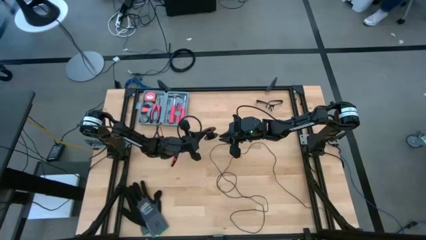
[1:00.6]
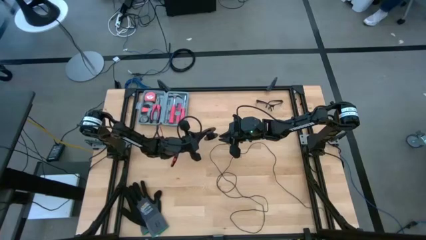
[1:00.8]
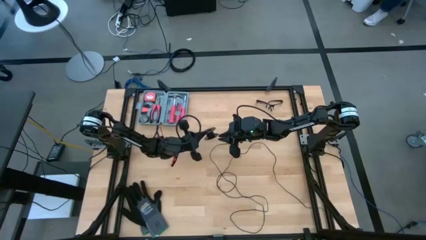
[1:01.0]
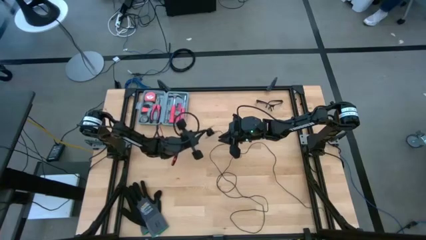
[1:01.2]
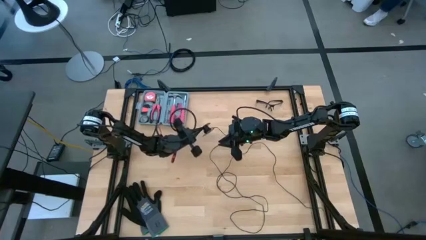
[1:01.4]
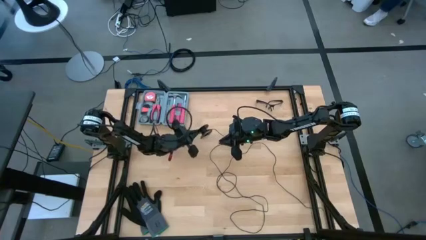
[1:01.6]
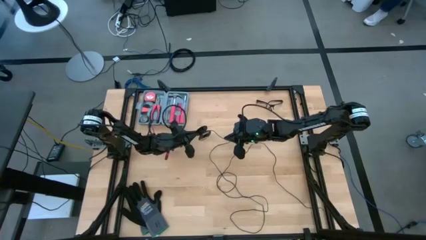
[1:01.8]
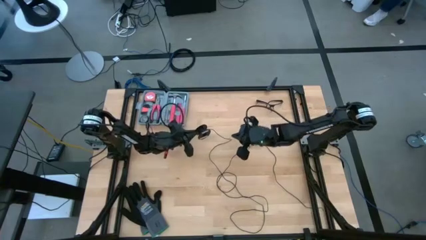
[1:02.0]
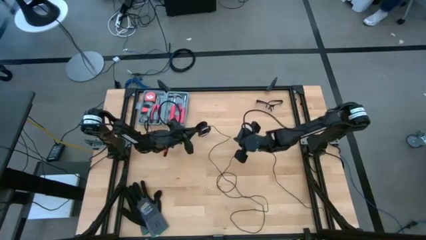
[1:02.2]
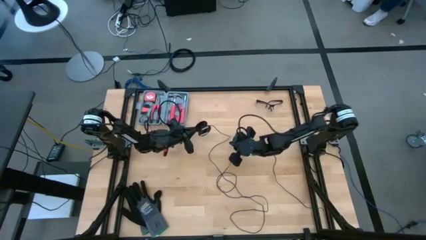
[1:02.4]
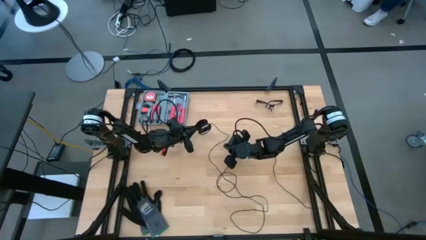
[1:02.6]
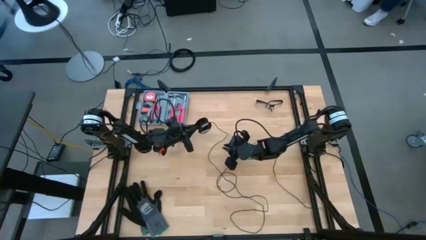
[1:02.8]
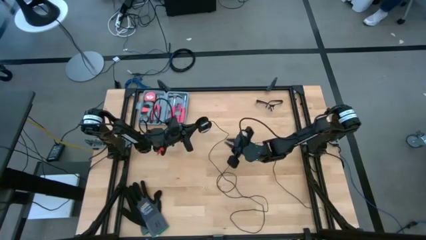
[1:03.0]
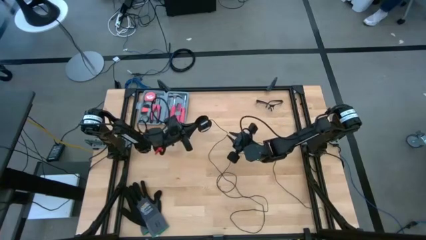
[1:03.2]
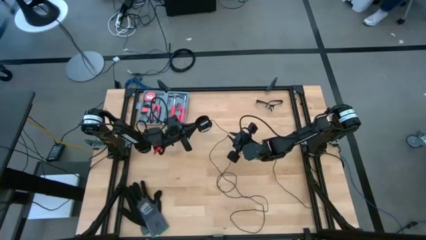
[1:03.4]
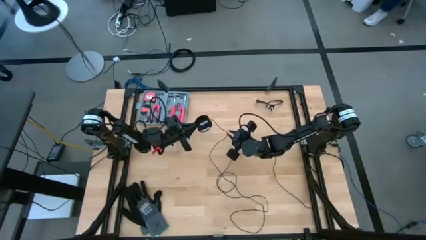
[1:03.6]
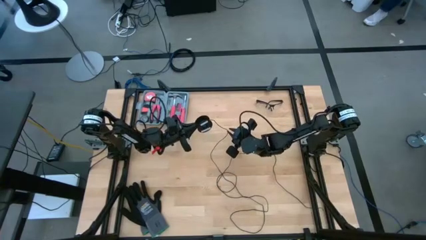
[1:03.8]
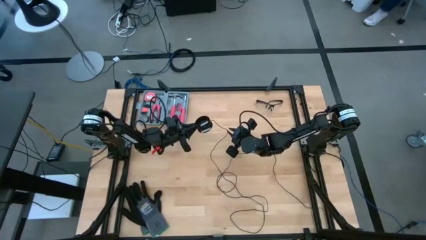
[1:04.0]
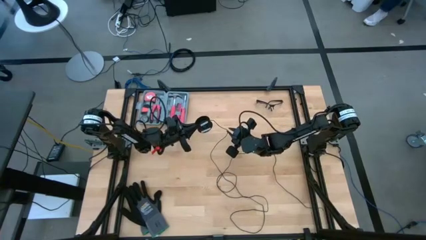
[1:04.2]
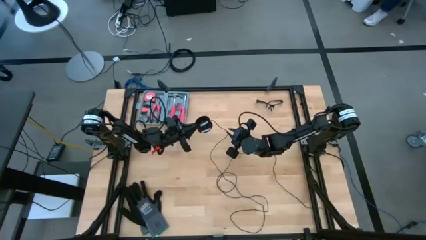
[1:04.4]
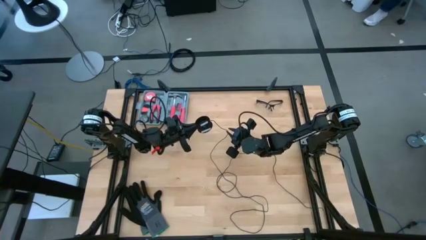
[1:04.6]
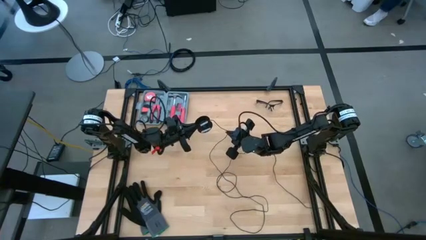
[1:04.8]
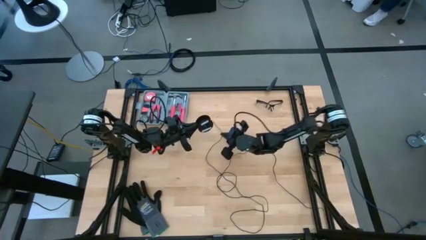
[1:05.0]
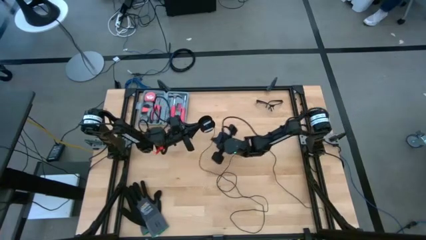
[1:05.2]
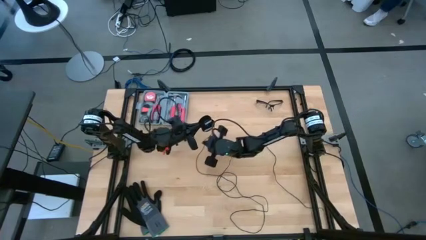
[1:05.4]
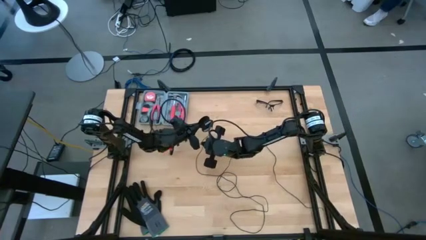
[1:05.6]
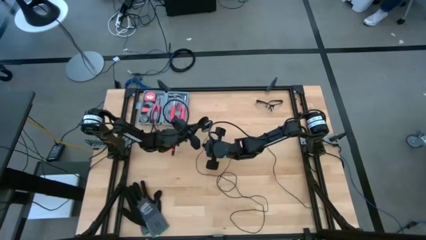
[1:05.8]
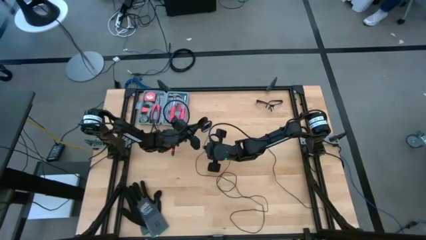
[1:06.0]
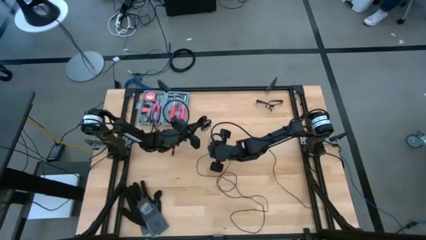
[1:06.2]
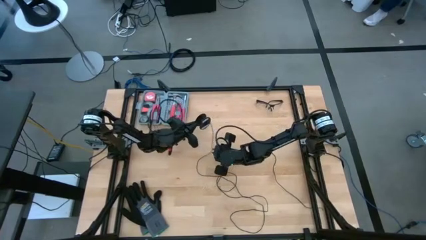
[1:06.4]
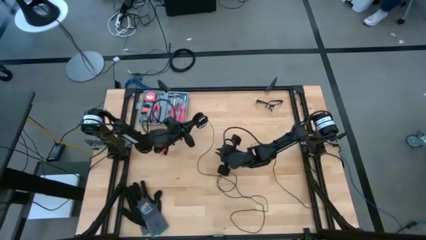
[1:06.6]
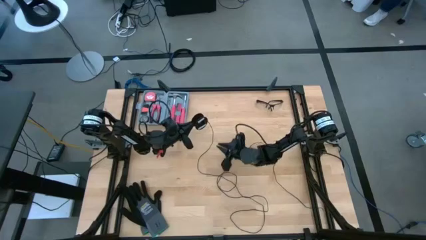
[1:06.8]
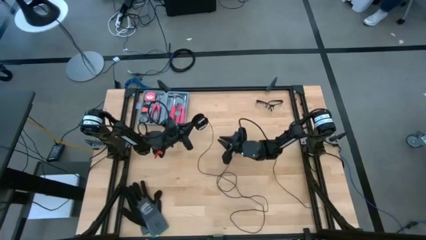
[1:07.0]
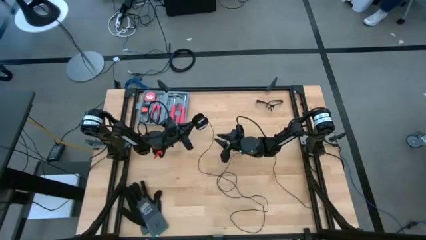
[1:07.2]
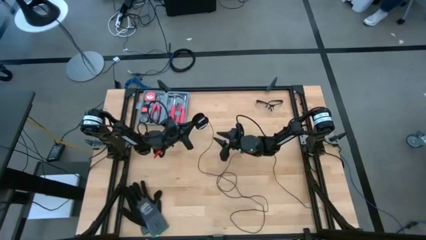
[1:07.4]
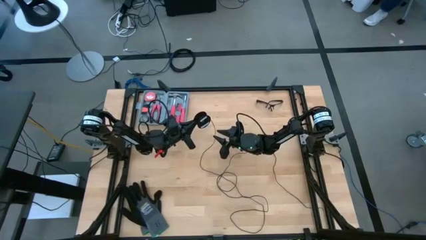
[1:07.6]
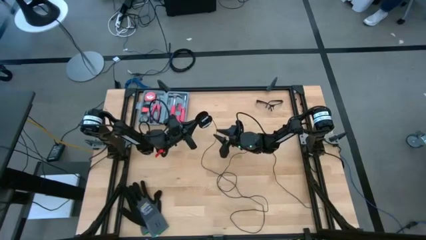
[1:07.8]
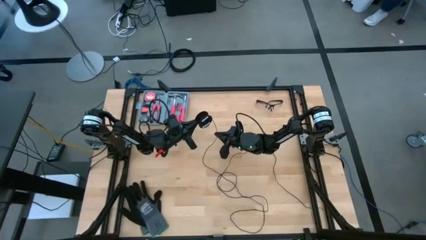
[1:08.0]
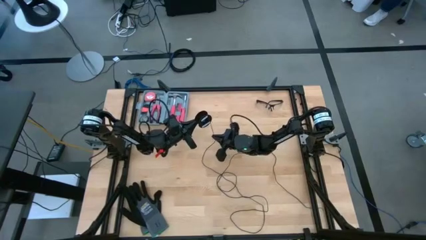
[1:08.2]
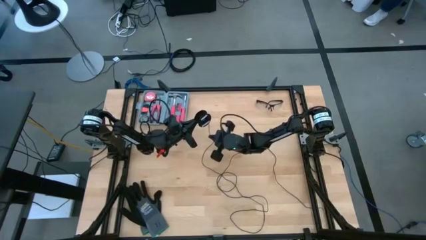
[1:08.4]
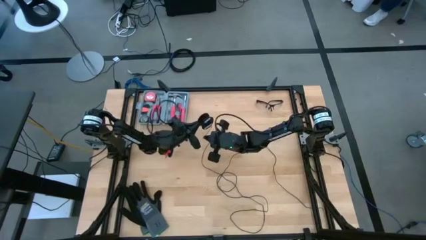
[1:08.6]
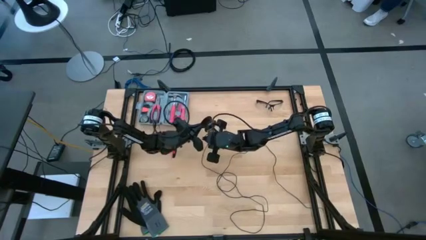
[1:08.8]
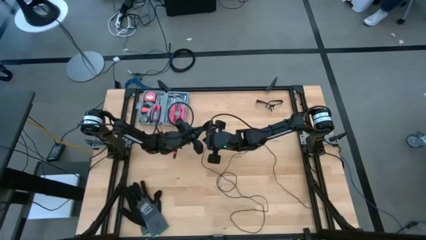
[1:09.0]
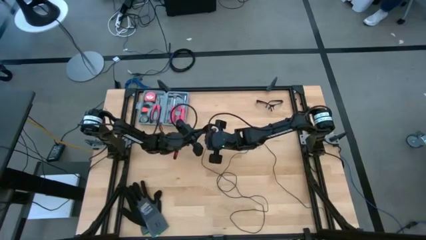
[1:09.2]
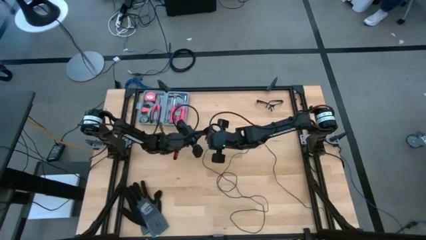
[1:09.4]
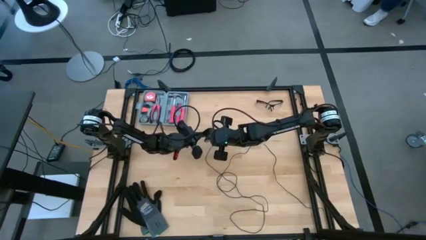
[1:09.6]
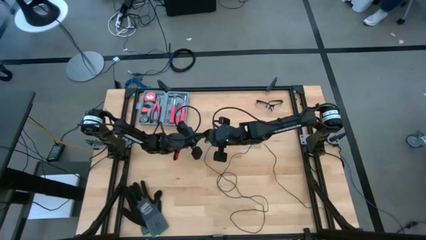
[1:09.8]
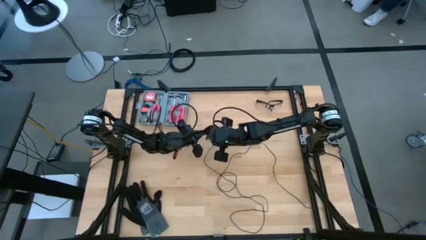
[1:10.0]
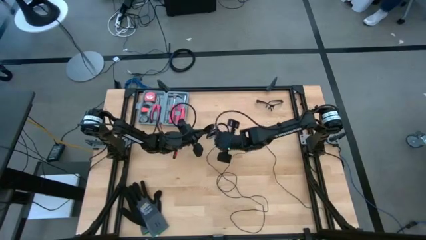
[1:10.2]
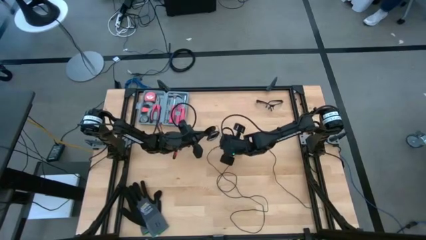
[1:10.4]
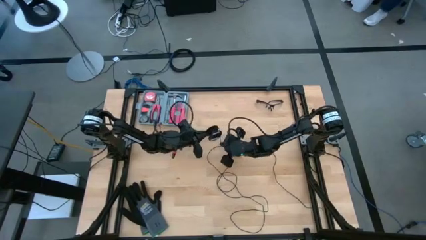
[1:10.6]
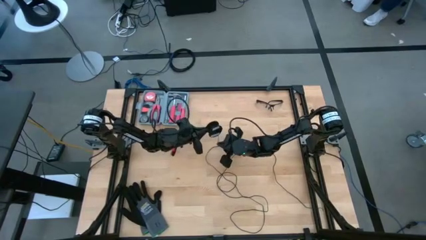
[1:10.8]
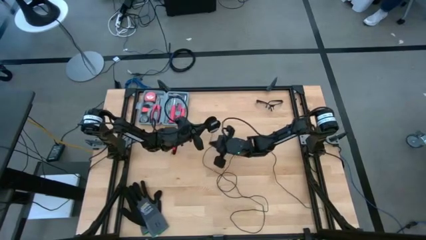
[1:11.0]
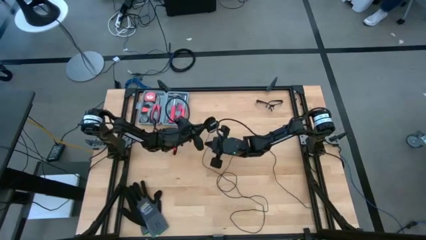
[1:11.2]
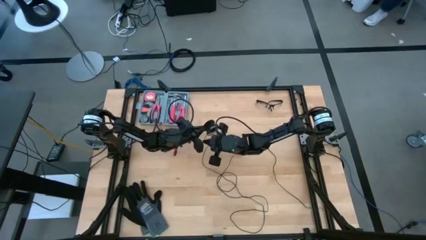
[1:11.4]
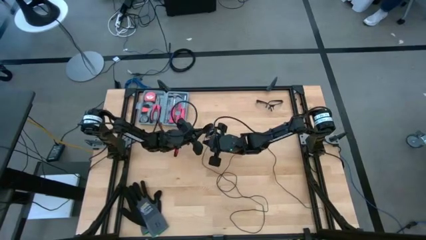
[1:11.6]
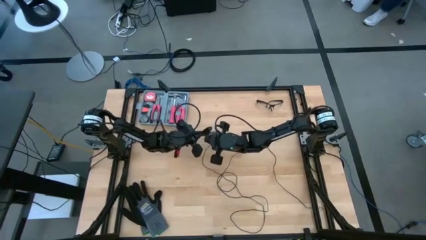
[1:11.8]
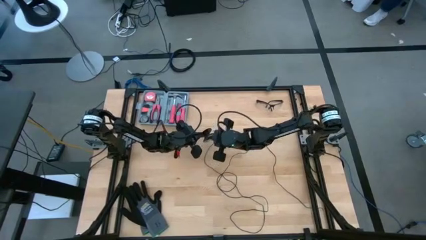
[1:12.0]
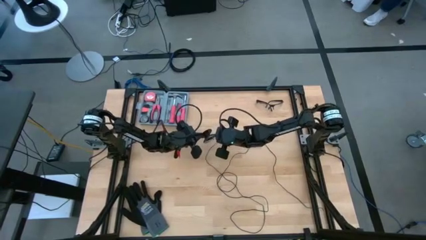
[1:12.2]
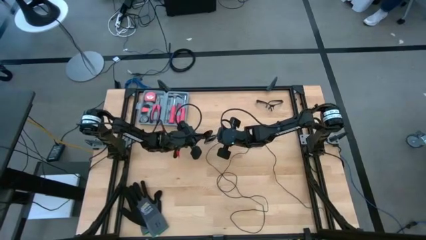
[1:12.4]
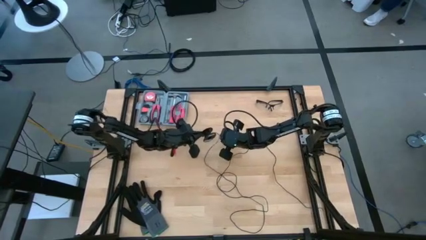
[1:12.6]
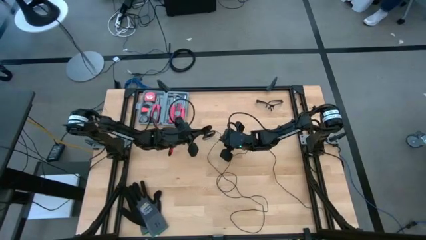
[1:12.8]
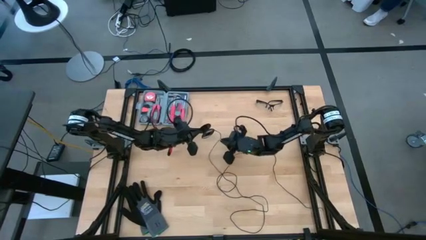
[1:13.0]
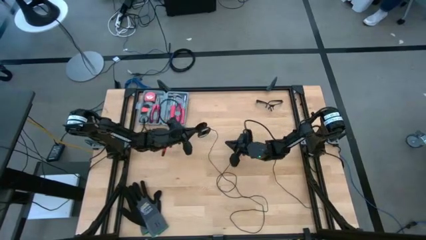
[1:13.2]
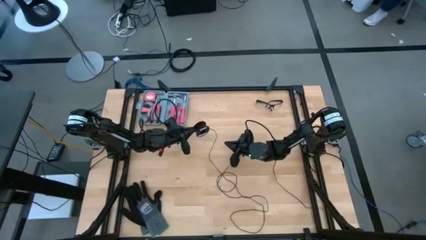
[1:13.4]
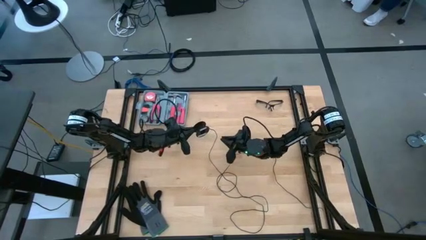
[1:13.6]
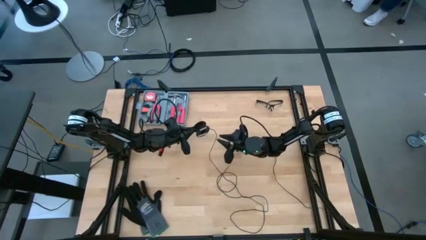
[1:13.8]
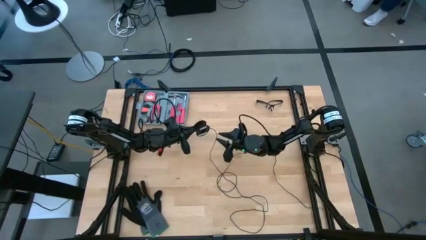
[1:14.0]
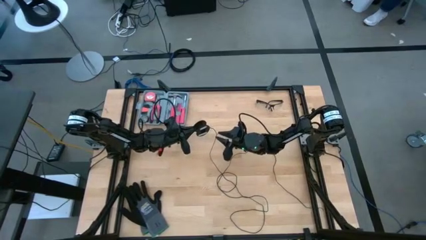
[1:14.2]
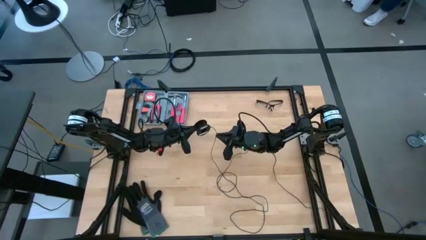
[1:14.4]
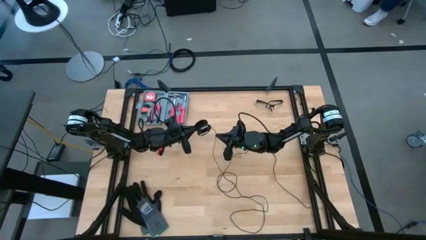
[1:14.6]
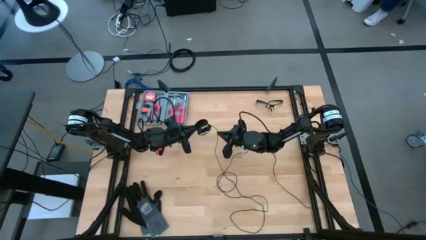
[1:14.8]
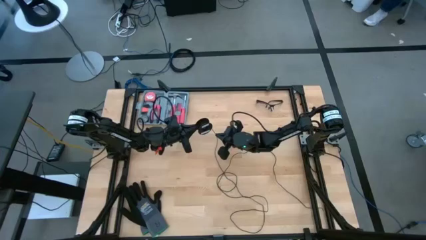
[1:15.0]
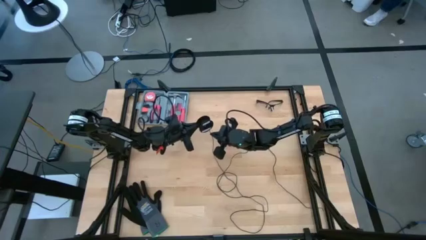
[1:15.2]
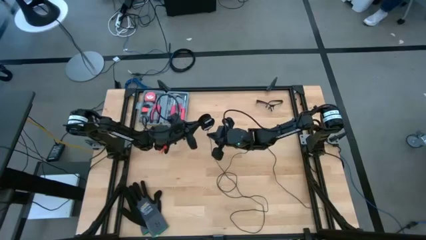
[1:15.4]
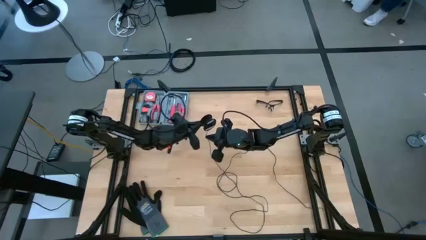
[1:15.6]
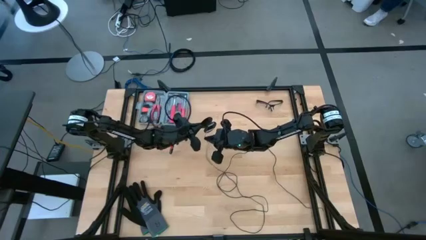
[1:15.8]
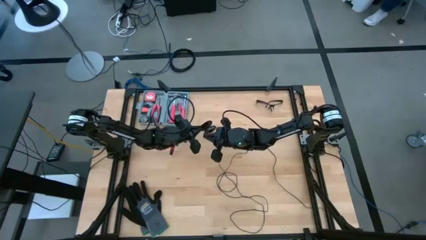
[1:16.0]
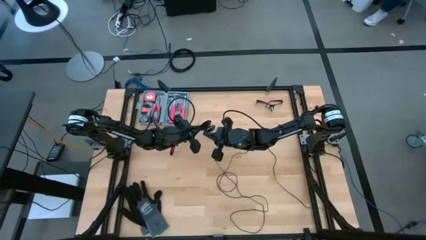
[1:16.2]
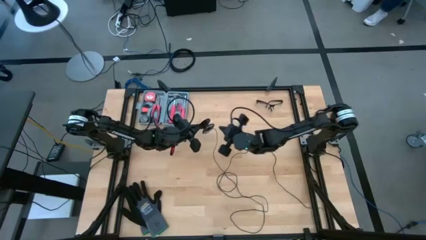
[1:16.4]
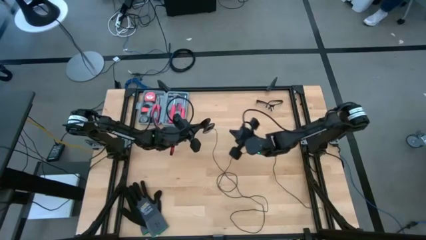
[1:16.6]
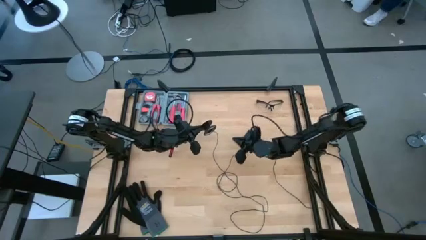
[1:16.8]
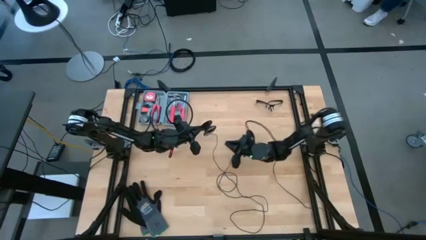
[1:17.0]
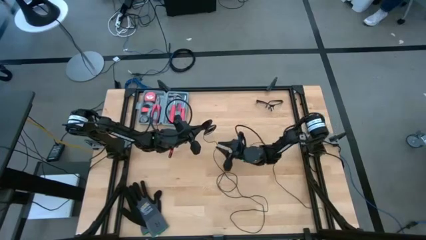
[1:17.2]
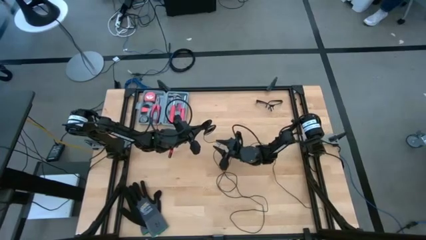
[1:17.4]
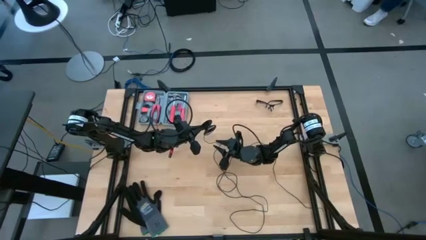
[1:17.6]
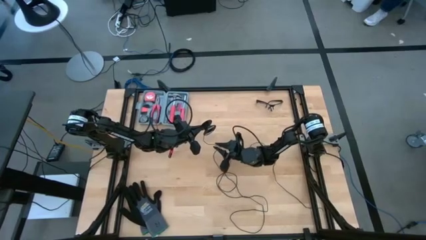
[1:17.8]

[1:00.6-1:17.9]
Task: Coil cords
Coil the black wire on the black spool
